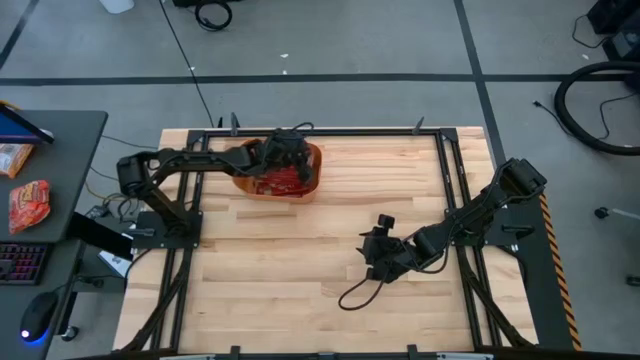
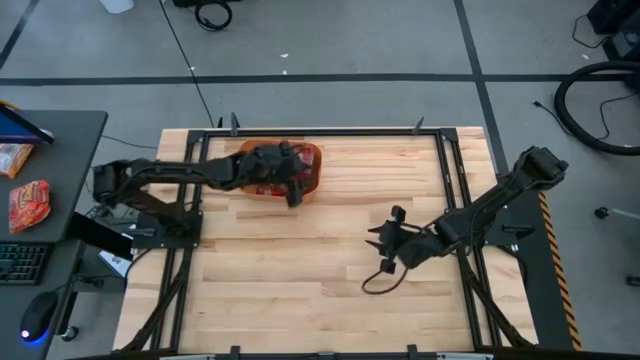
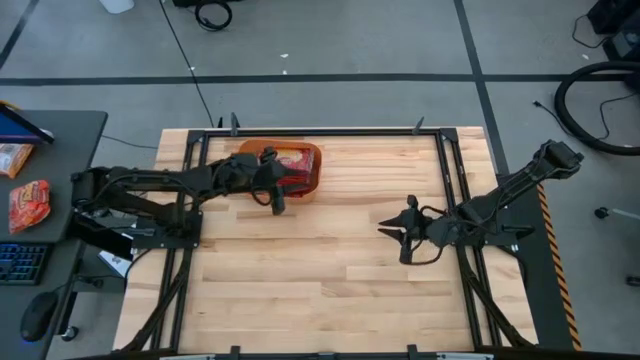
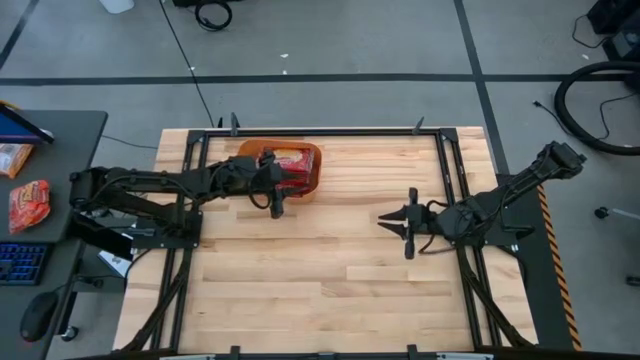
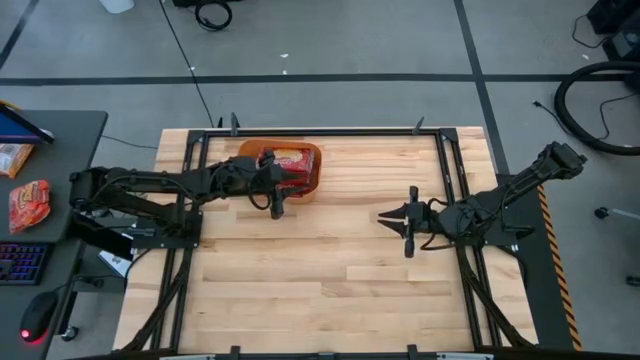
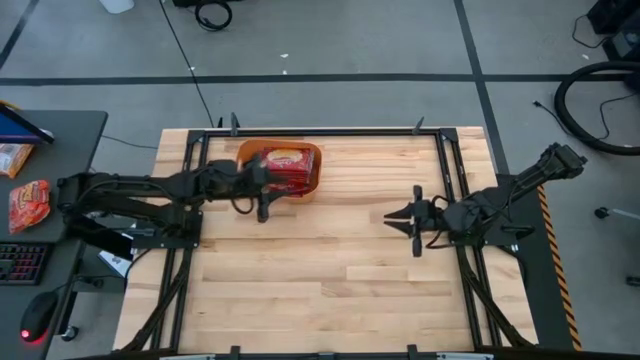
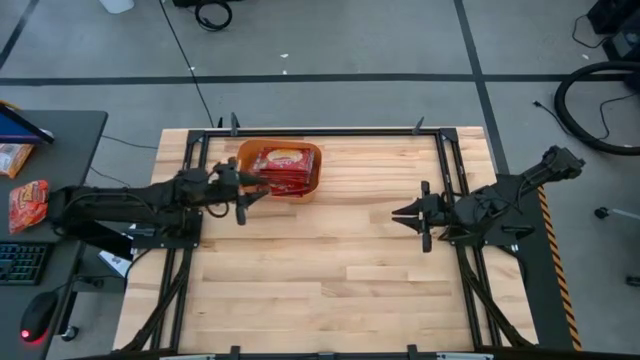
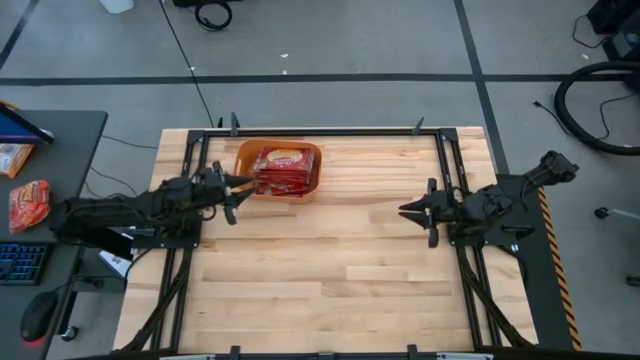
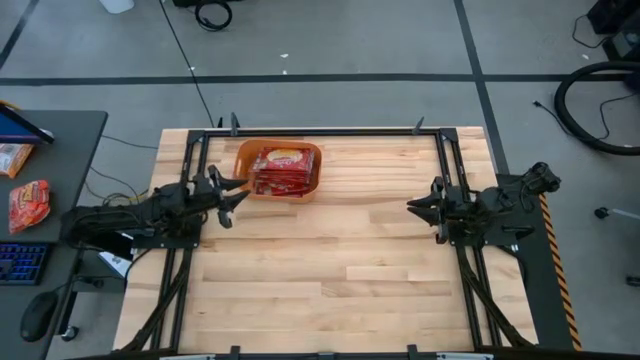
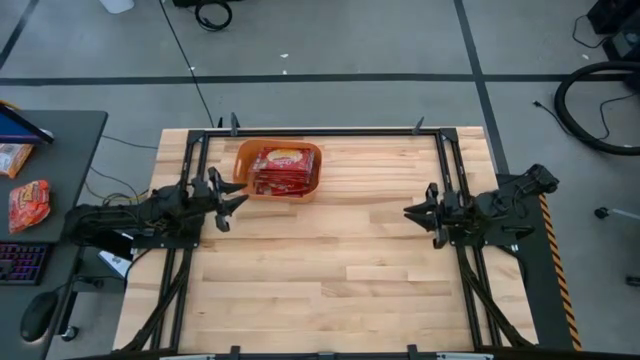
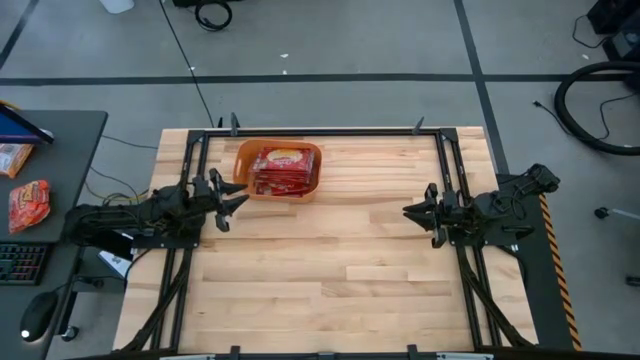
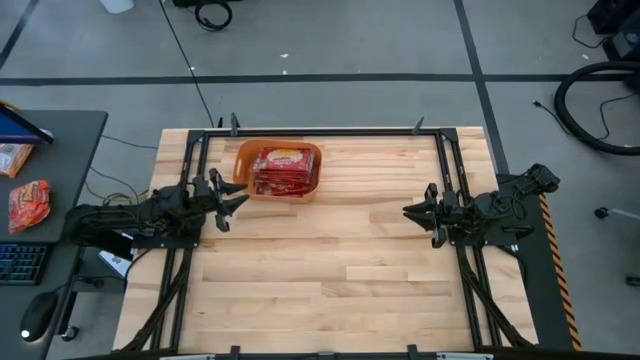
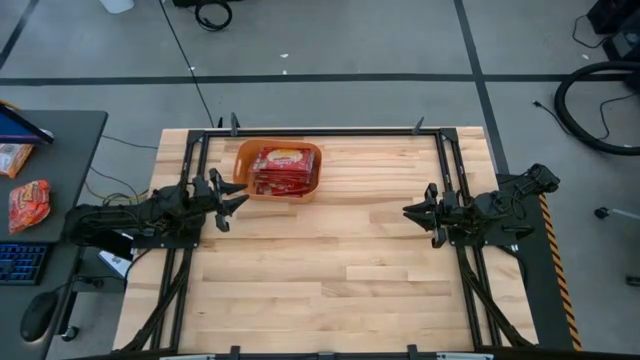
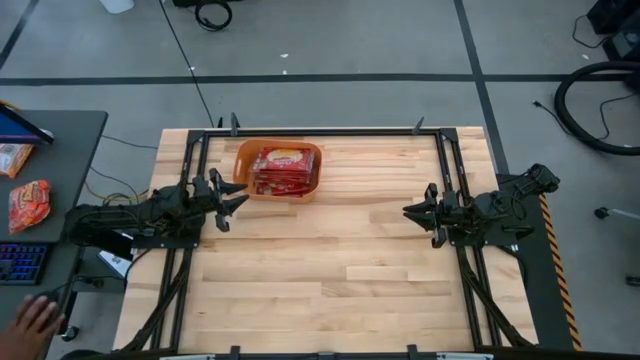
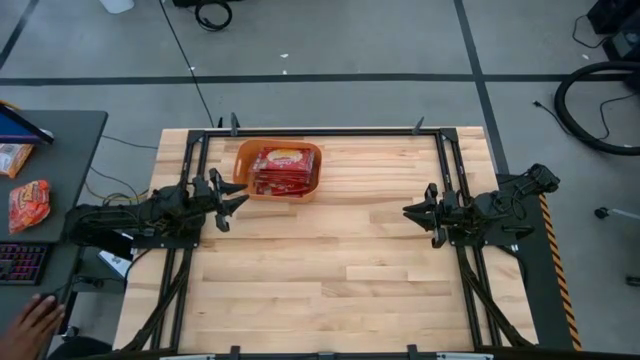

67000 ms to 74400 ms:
Task: Sort popcorn bags into baskets
Return to Home Position

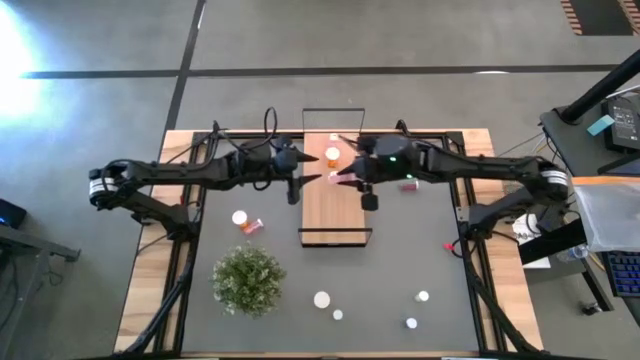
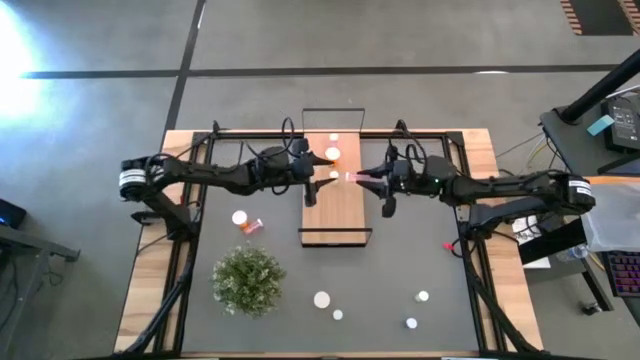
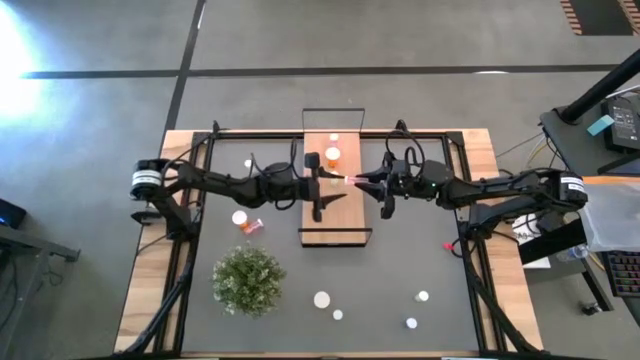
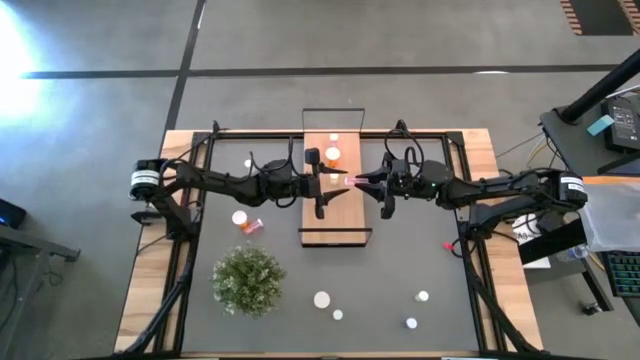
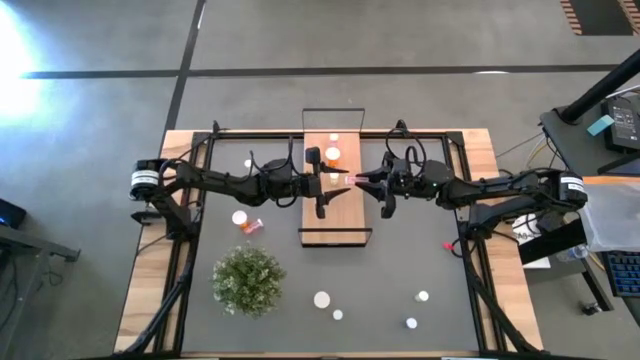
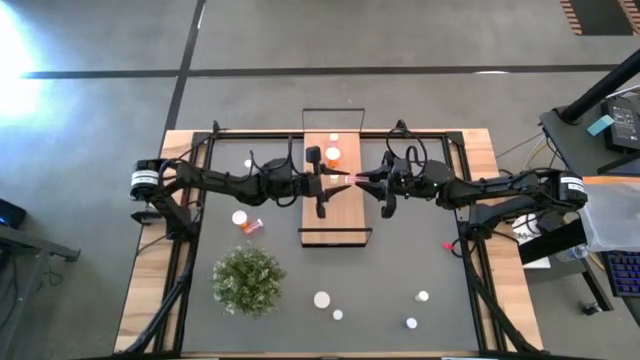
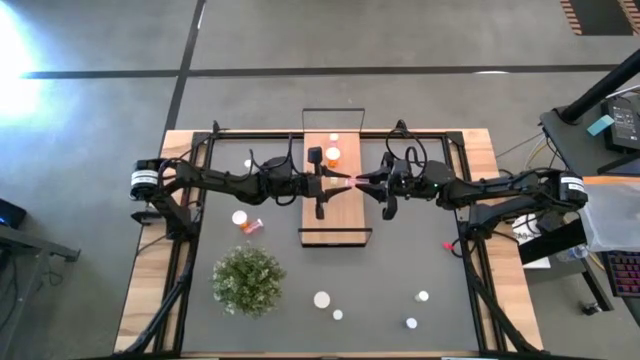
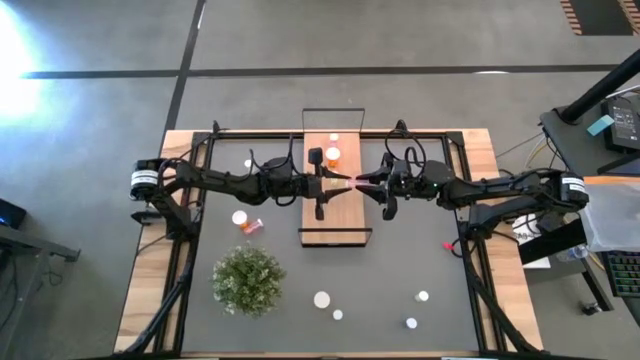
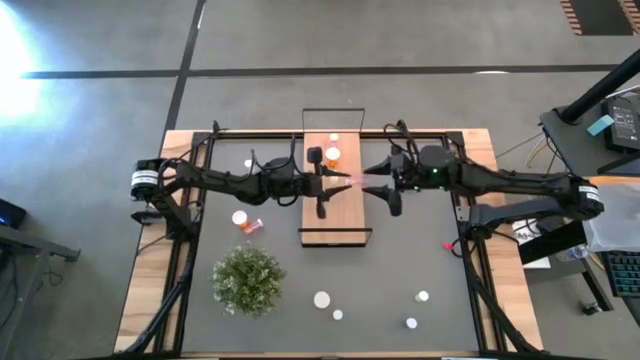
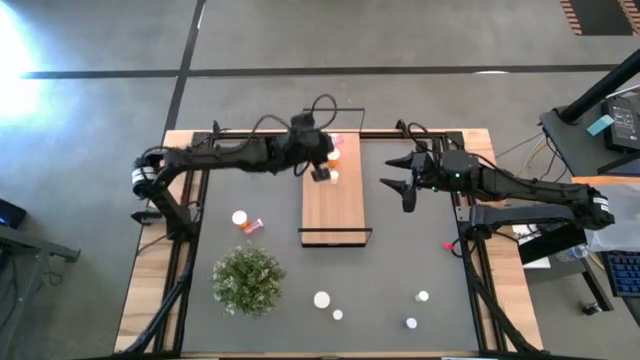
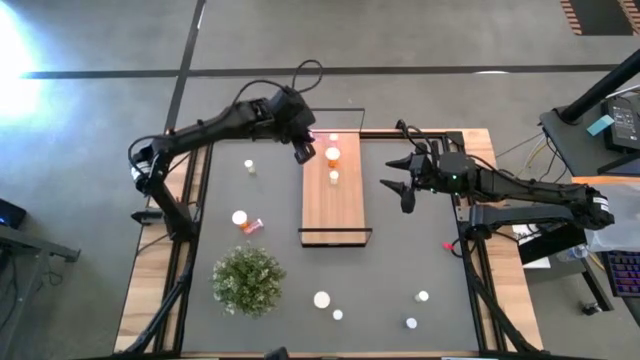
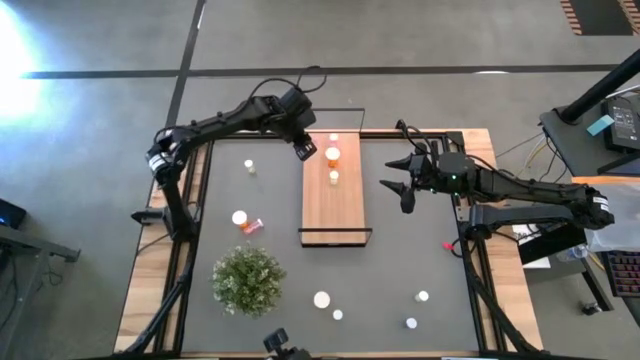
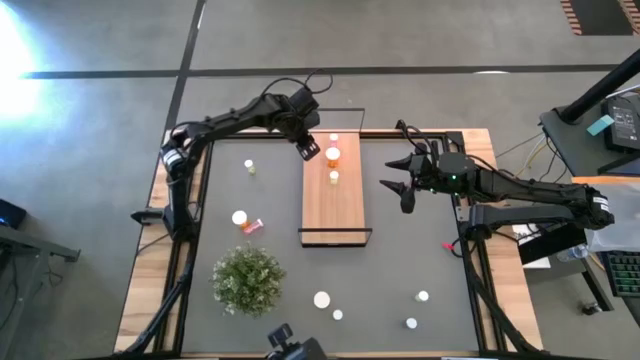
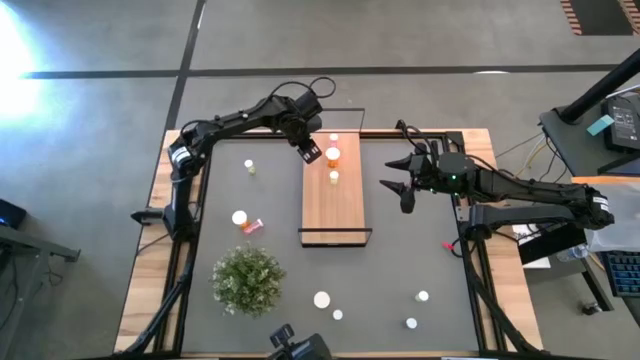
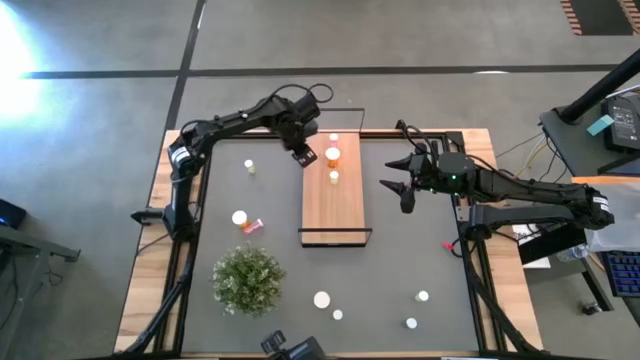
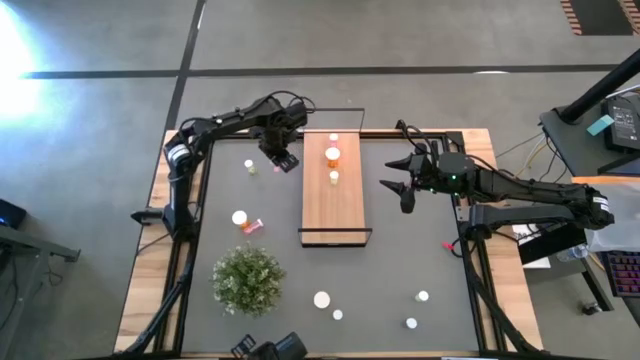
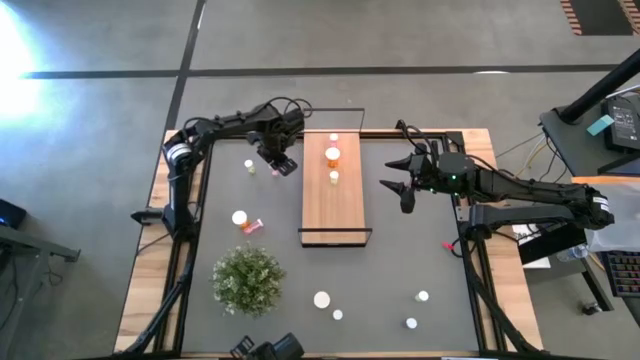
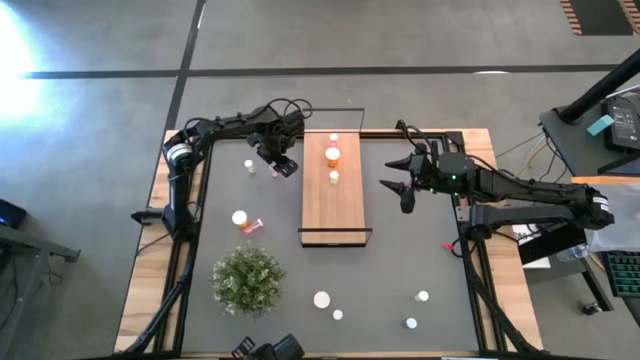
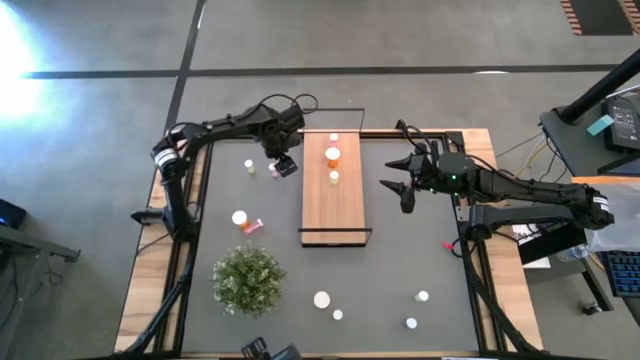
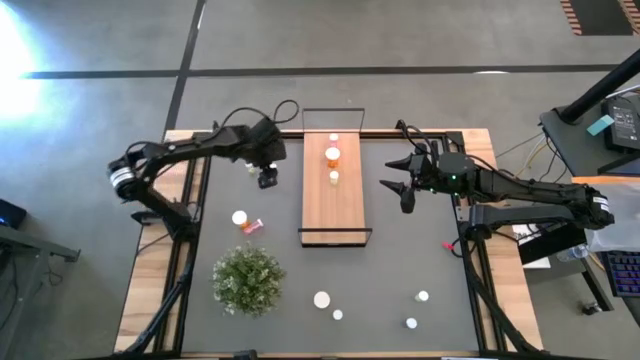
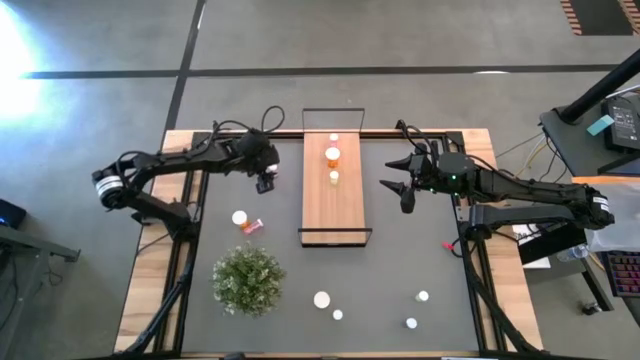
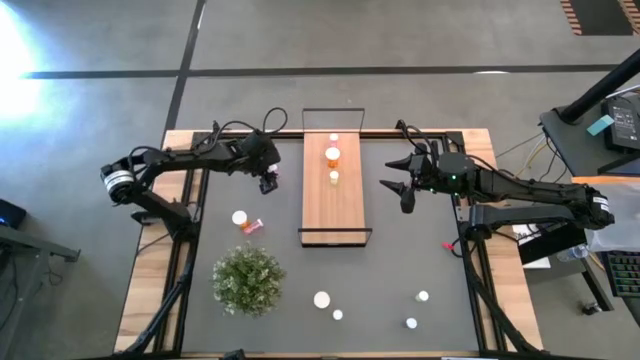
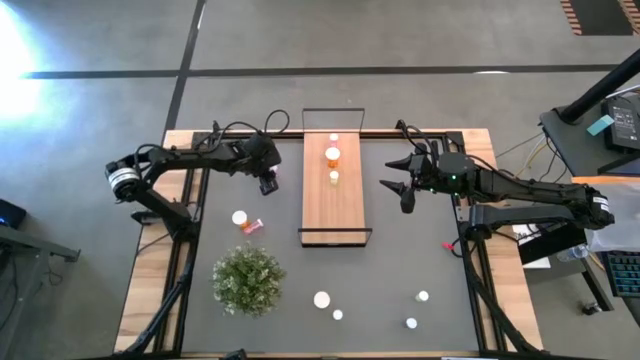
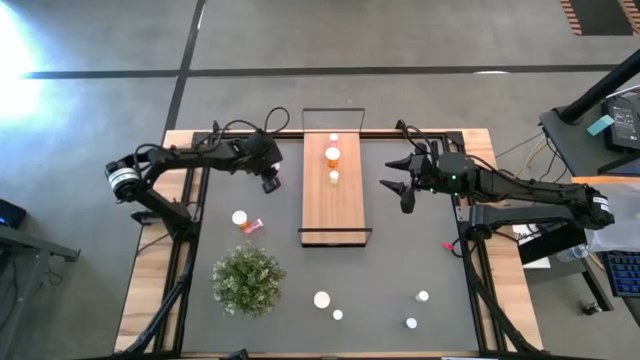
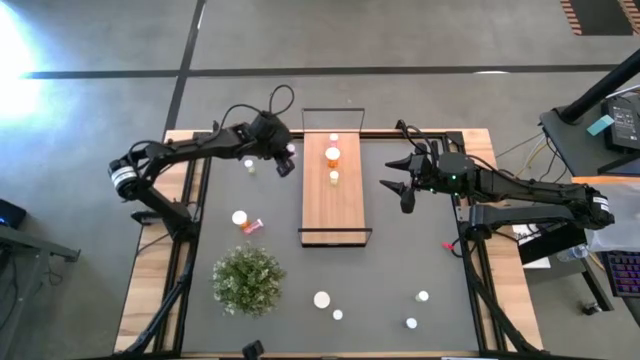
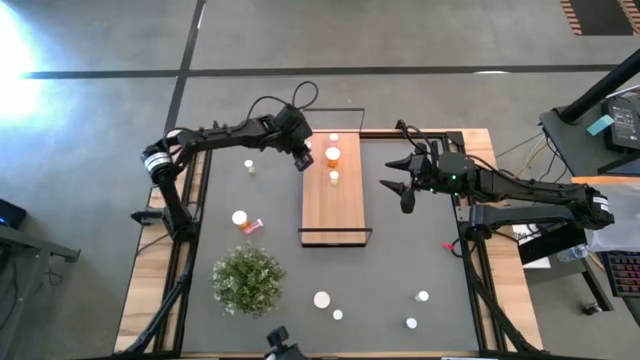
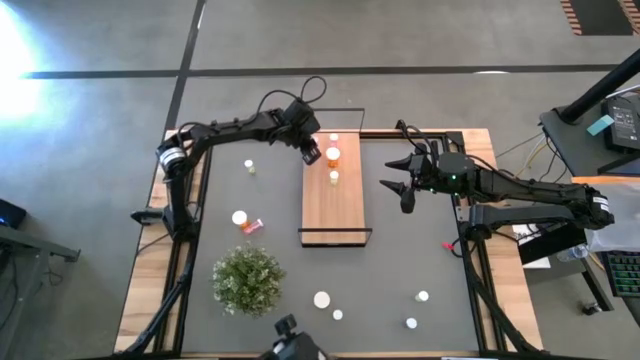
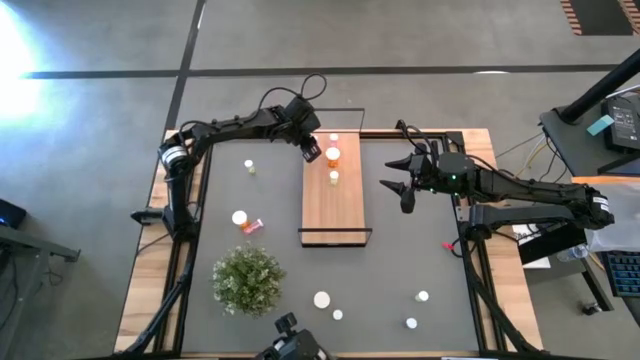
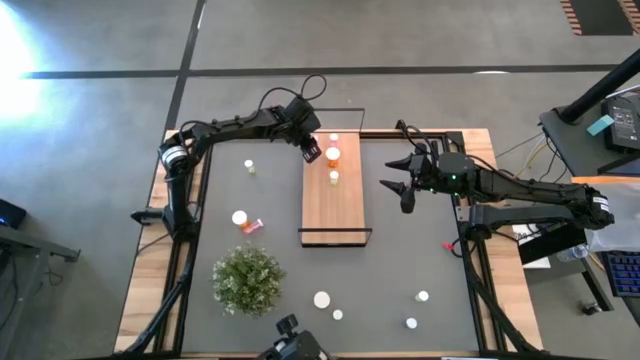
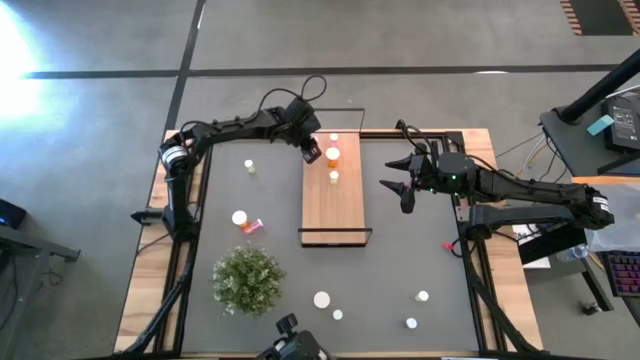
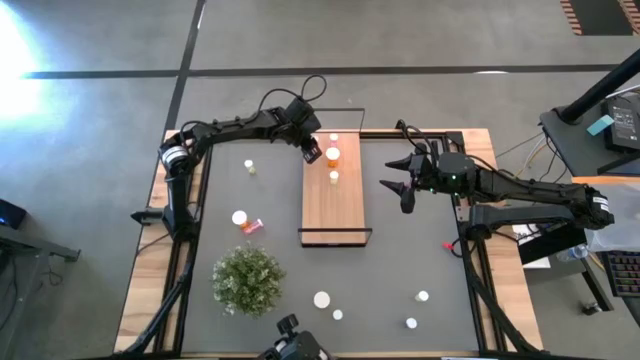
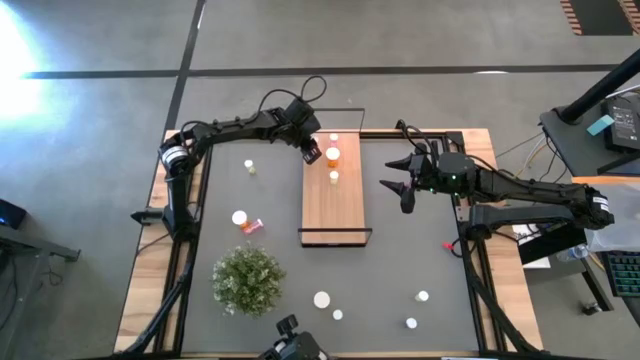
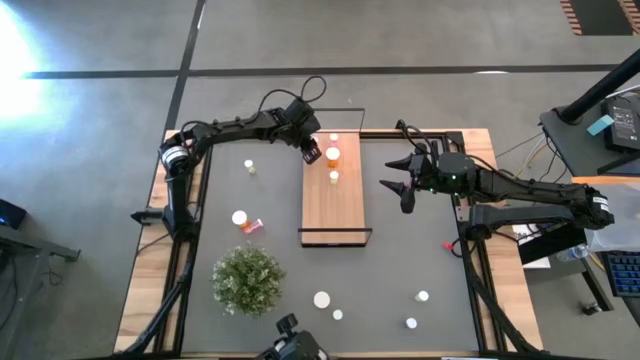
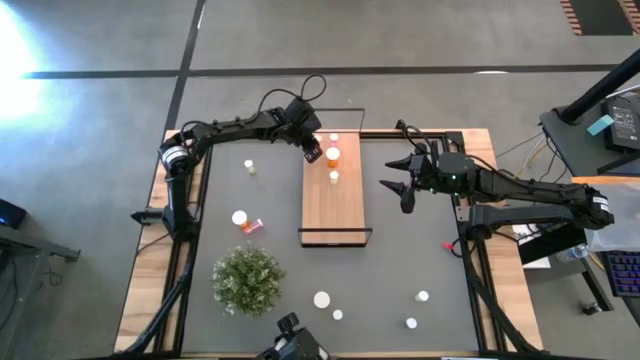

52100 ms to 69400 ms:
Task: Pick and place medicine bottles onto shelf by color
Put the top pink pill bottle on the shelf aligned with the other pink pill bottle
